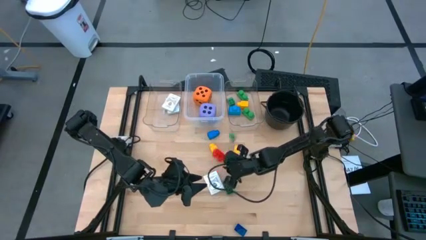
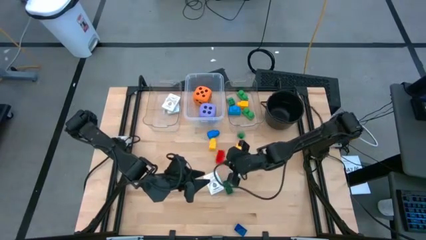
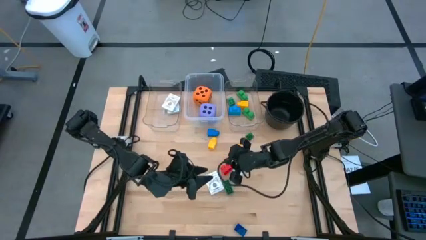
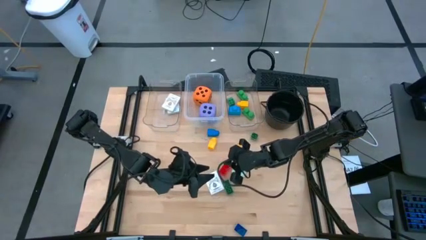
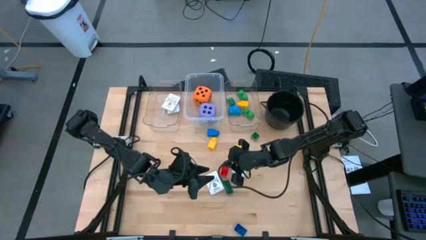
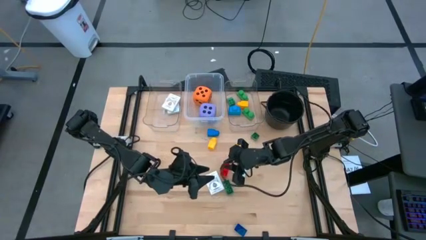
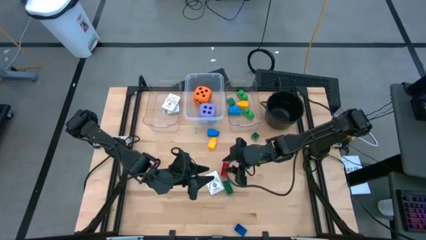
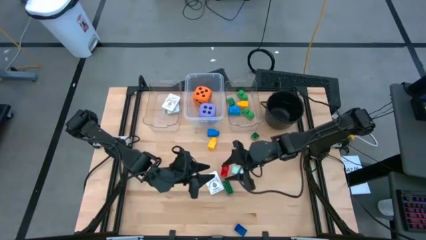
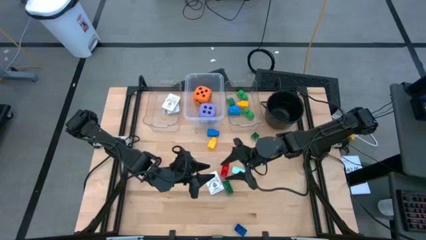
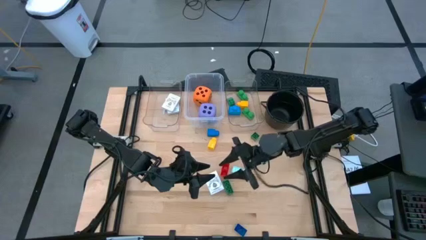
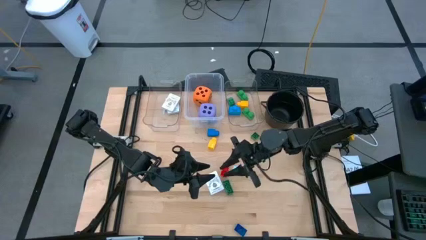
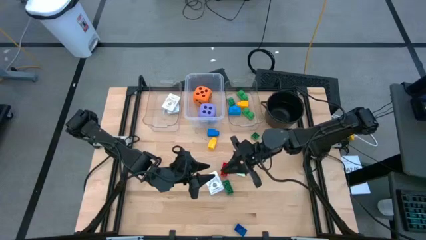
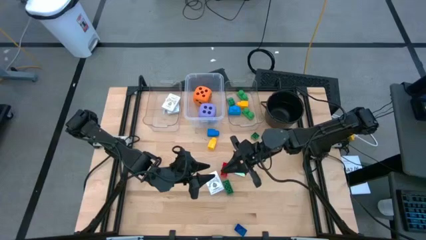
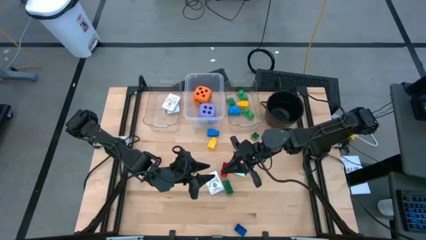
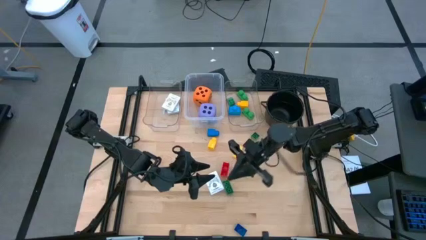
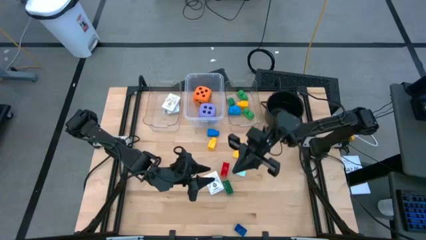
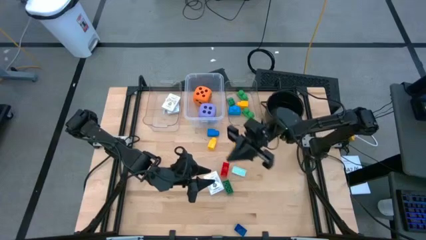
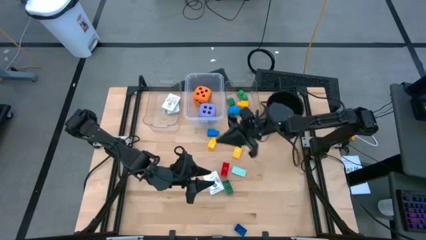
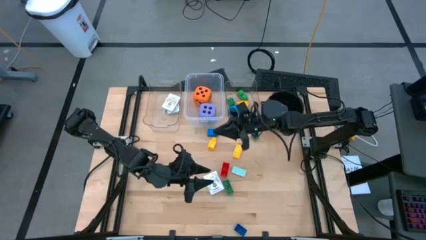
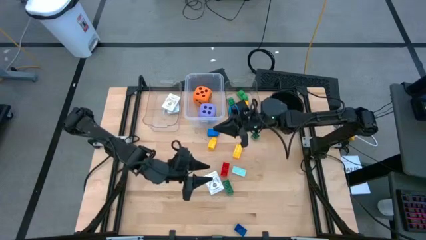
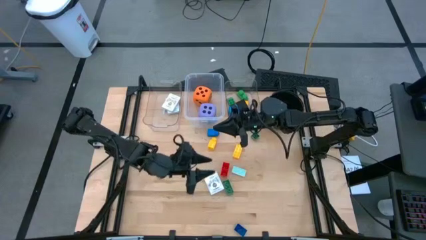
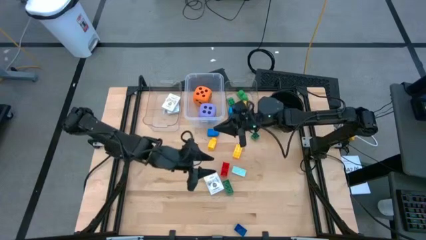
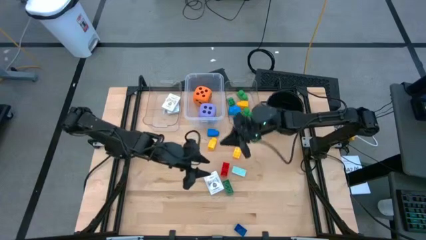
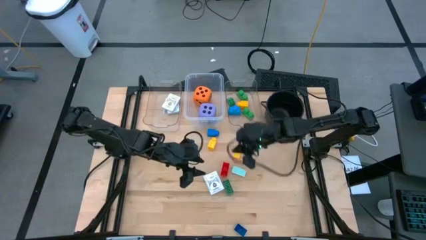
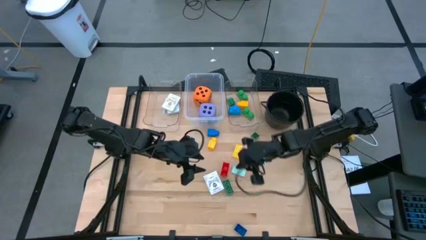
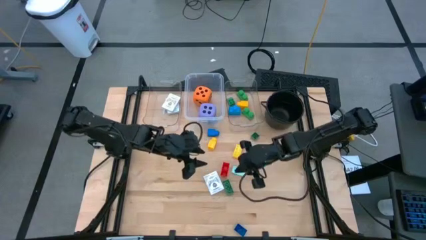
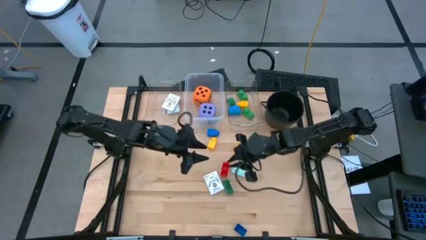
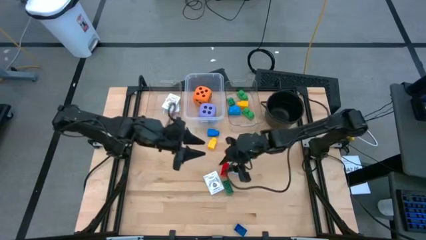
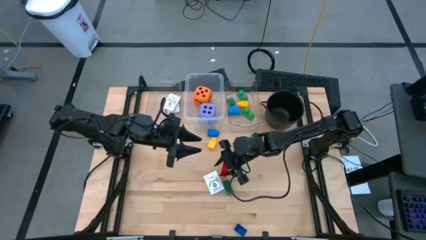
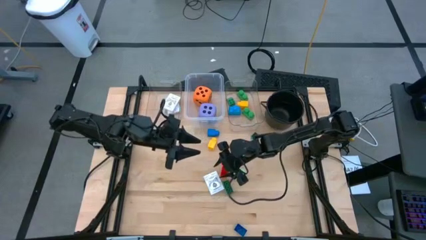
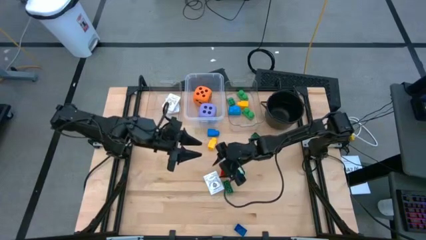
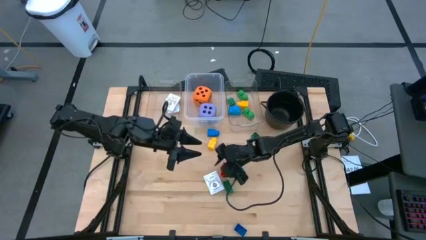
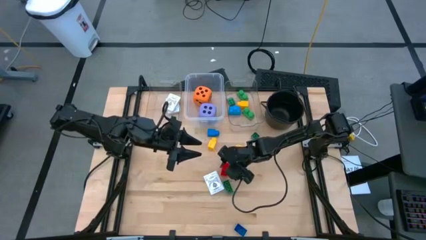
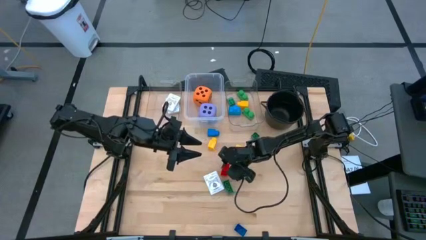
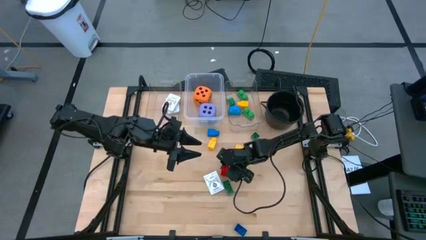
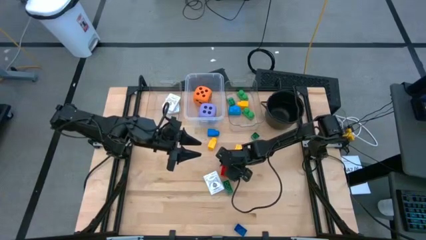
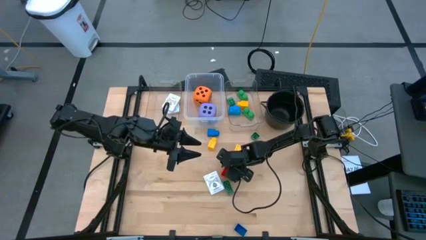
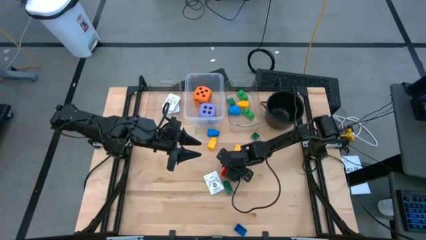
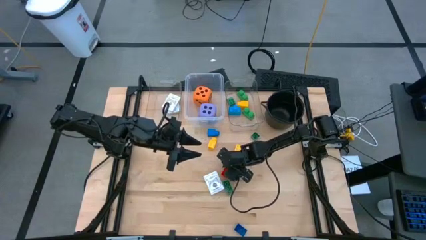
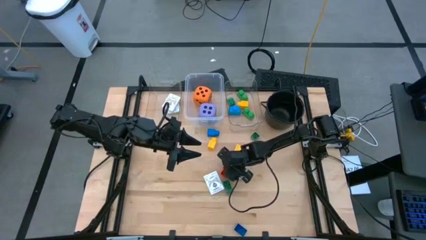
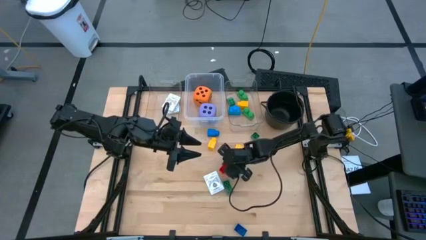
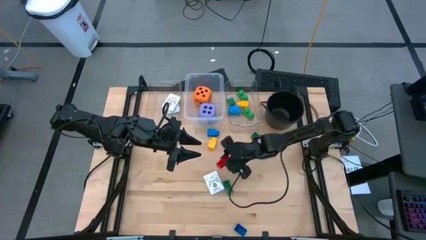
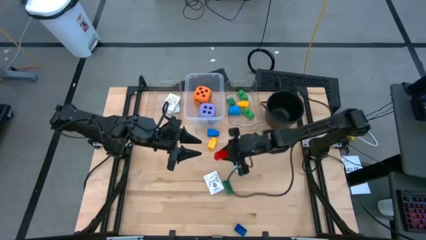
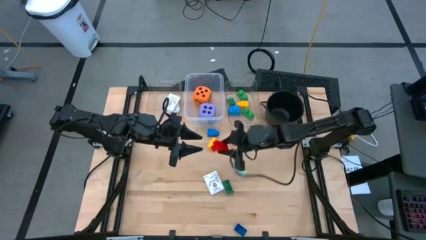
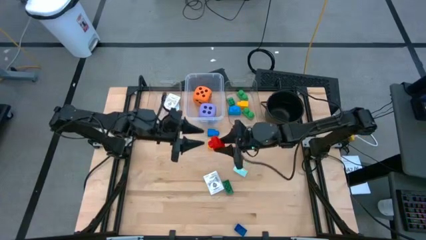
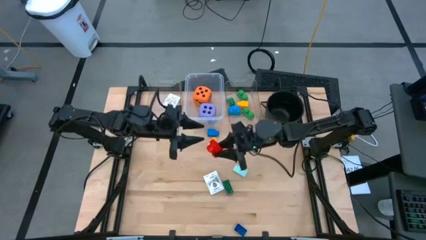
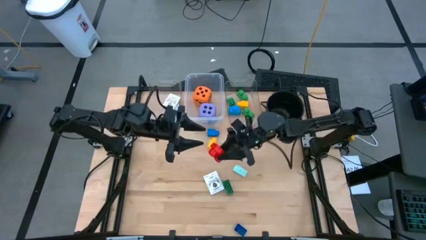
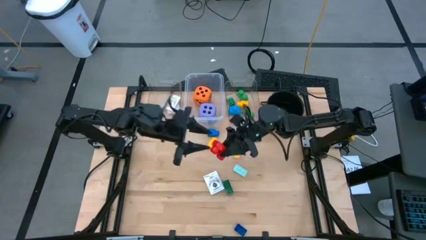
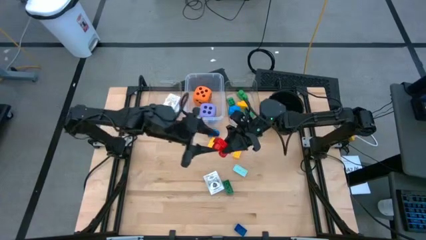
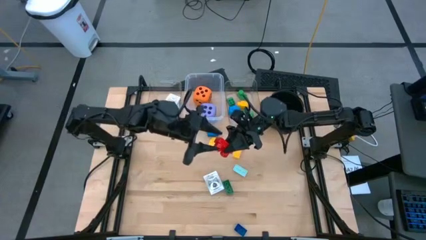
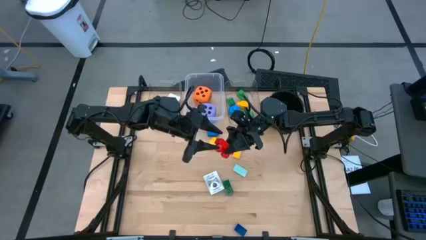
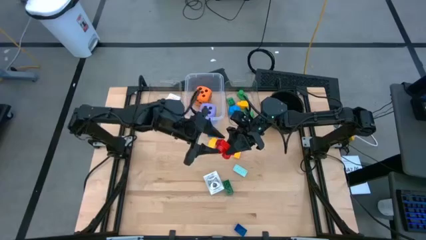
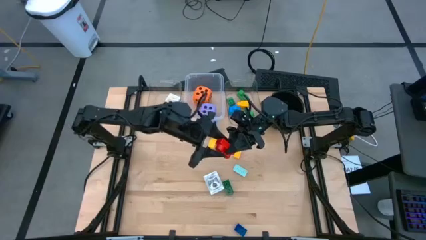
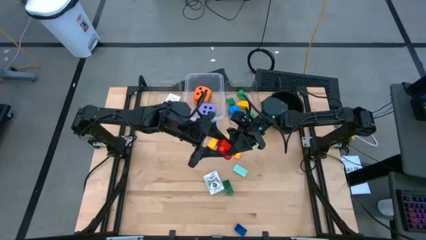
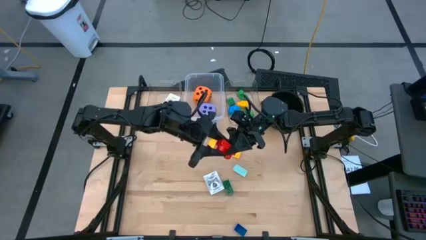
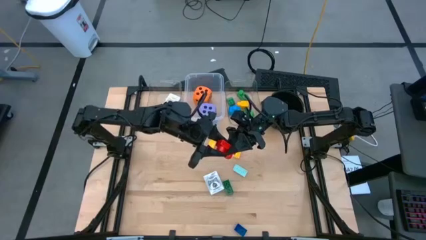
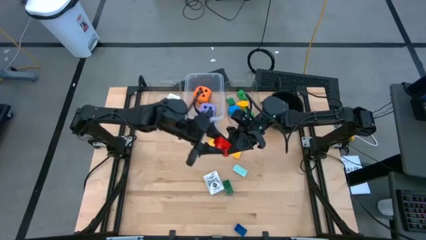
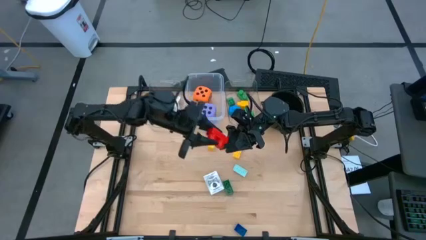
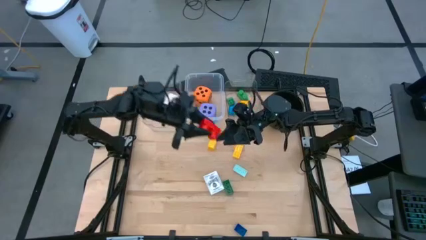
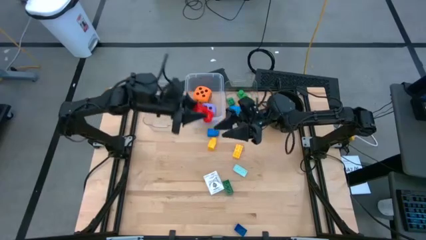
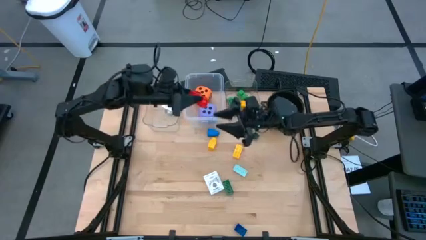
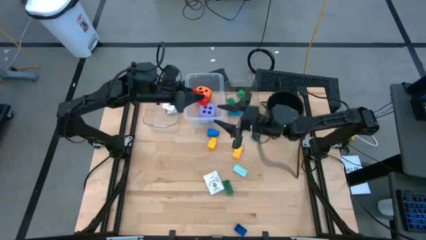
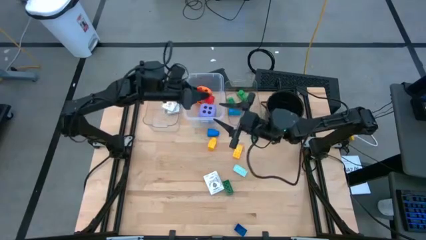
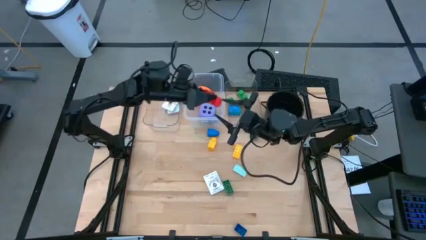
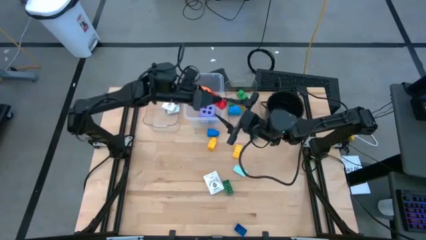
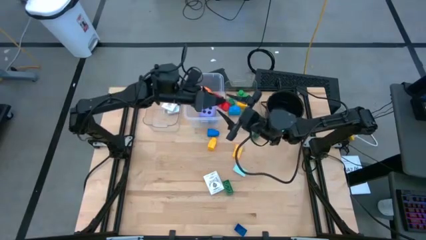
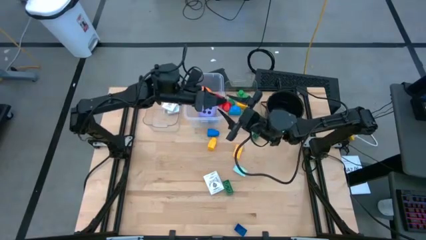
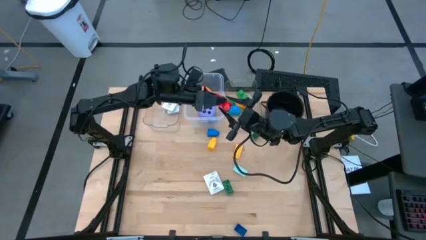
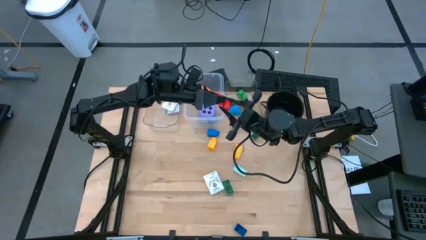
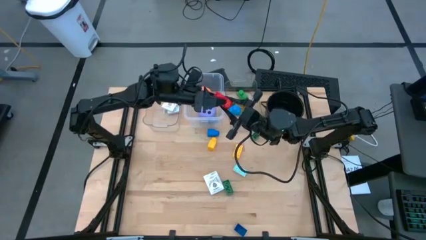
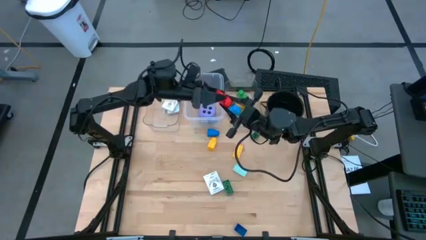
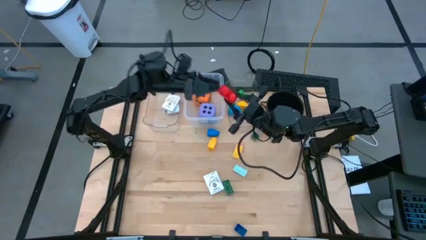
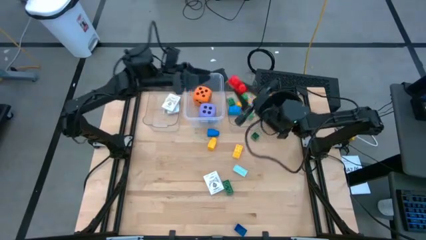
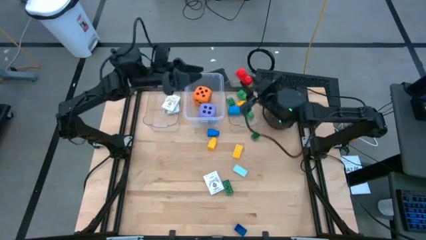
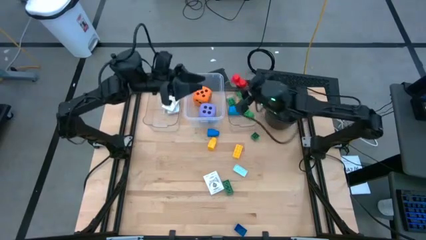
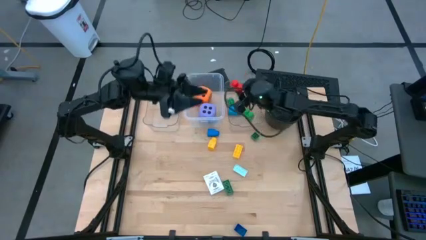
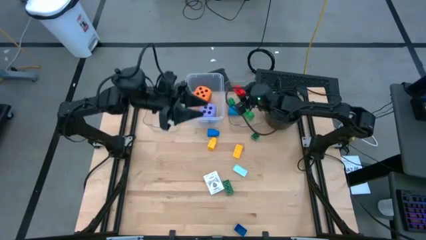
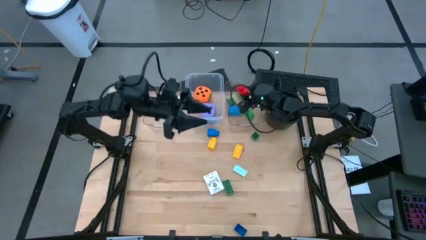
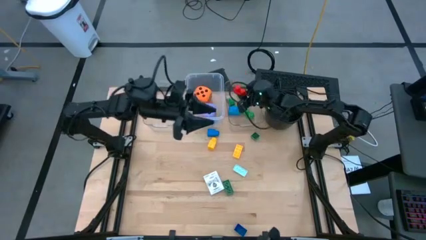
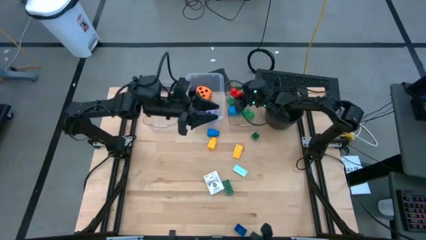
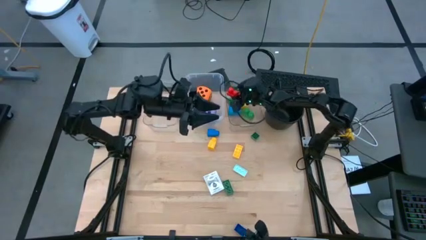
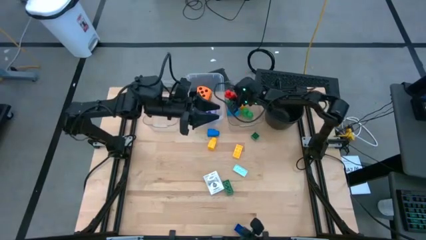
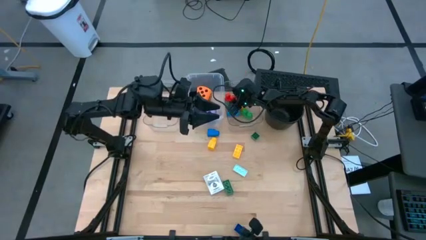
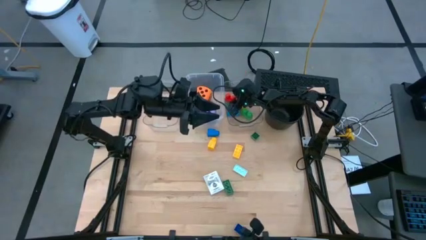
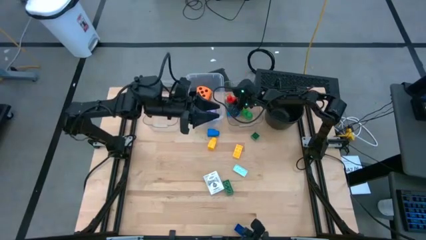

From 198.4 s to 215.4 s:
Task: Pick & Place Toys
Put the red game piece into the right transparent bin
